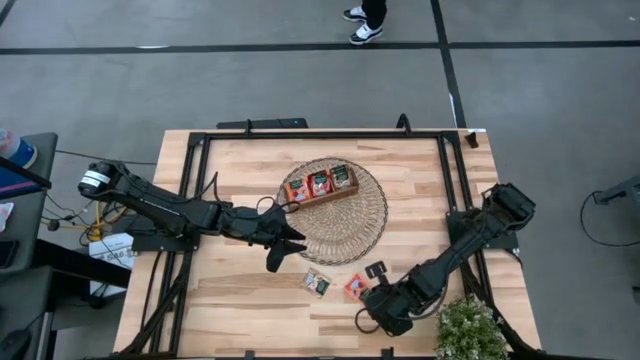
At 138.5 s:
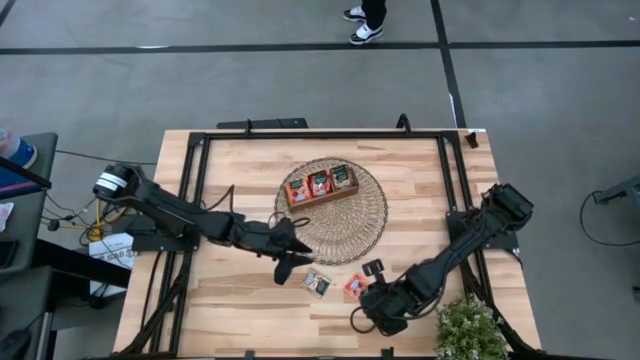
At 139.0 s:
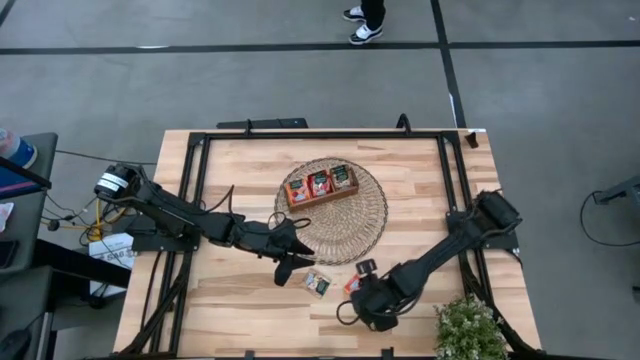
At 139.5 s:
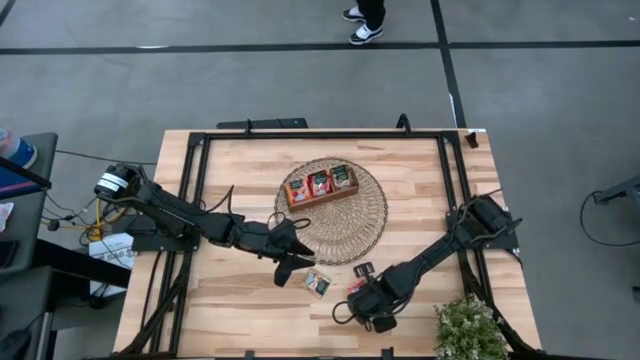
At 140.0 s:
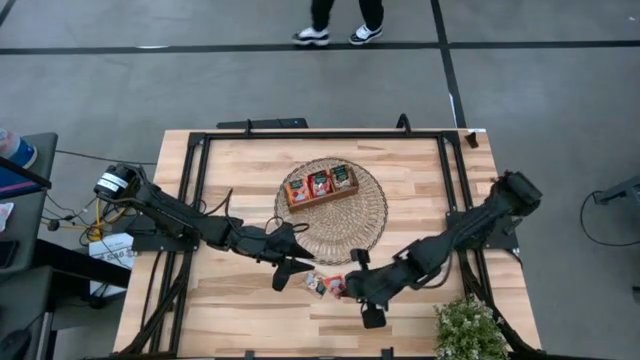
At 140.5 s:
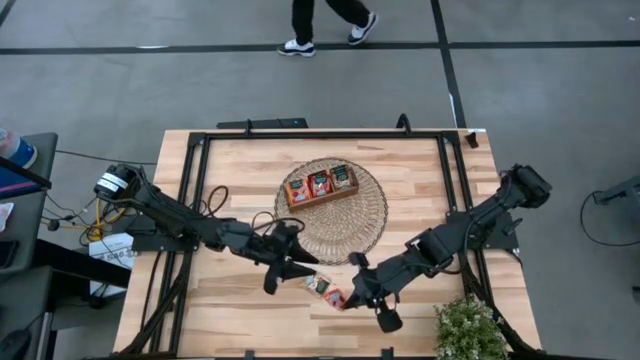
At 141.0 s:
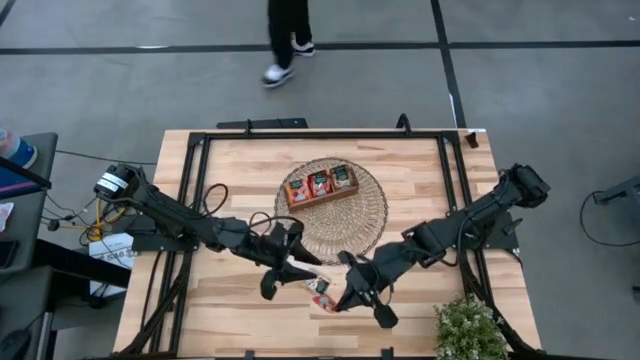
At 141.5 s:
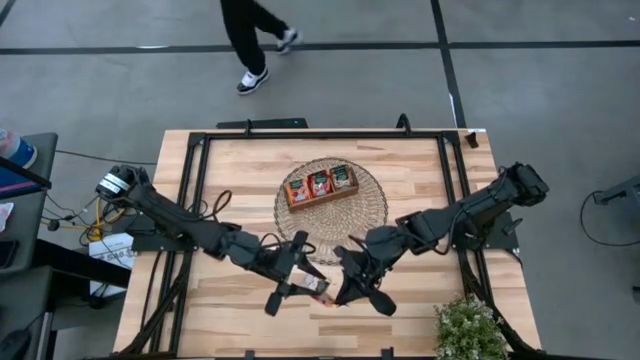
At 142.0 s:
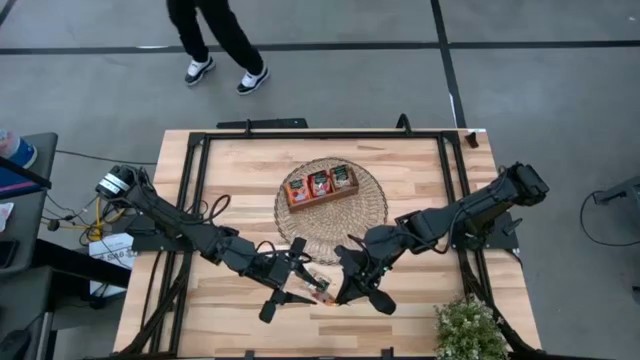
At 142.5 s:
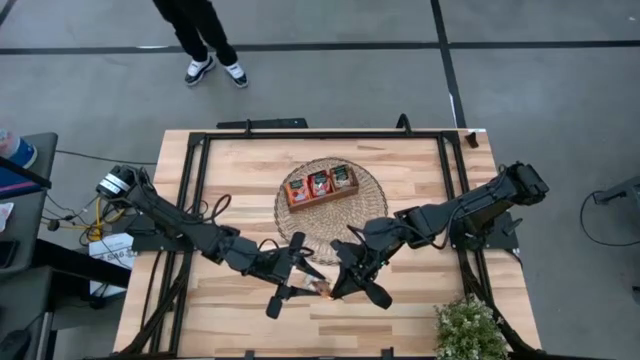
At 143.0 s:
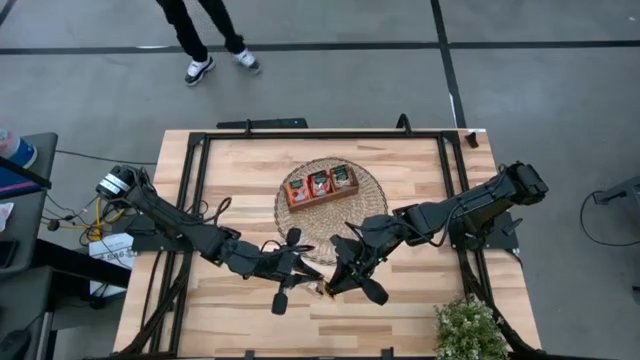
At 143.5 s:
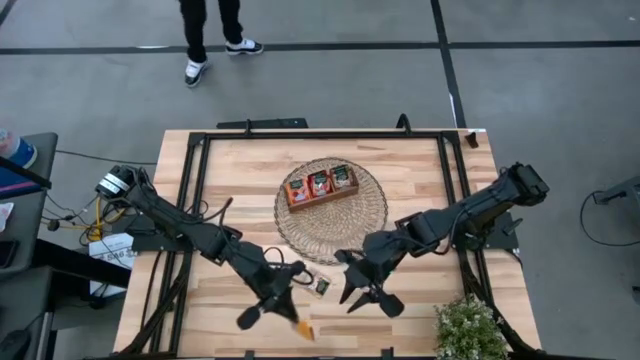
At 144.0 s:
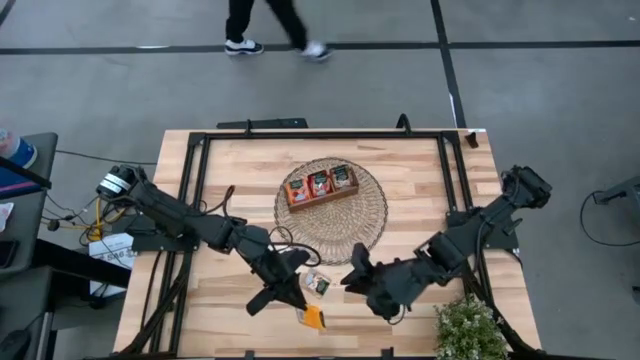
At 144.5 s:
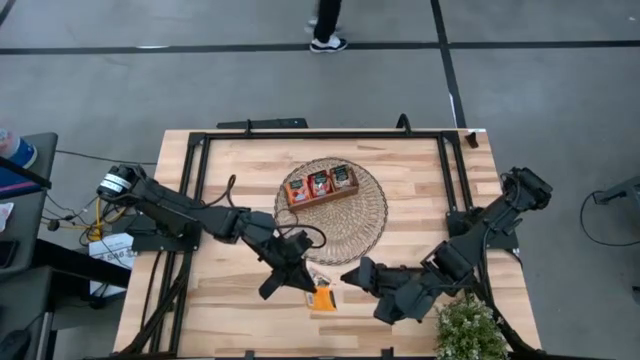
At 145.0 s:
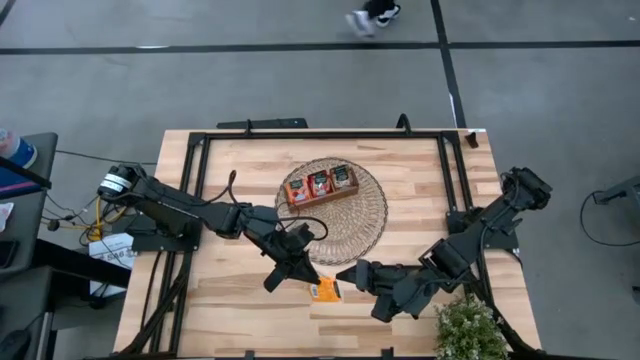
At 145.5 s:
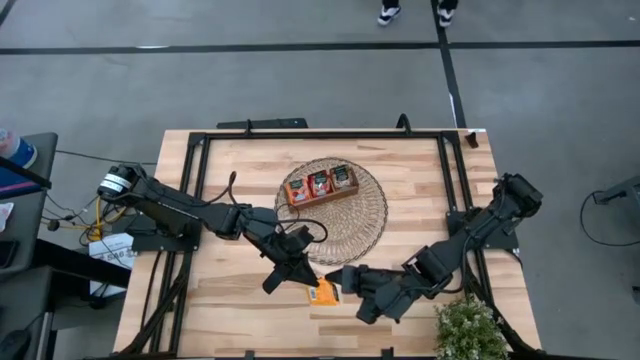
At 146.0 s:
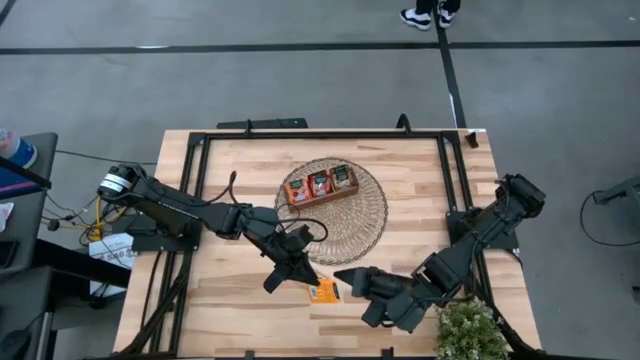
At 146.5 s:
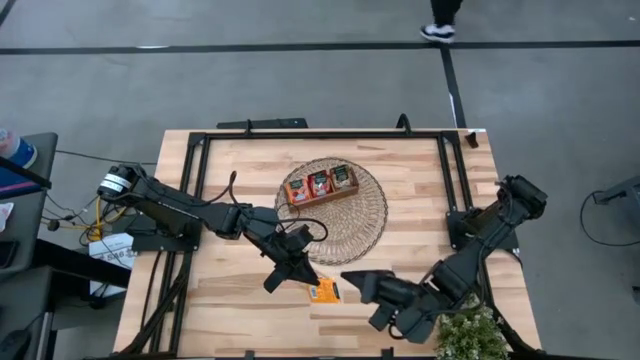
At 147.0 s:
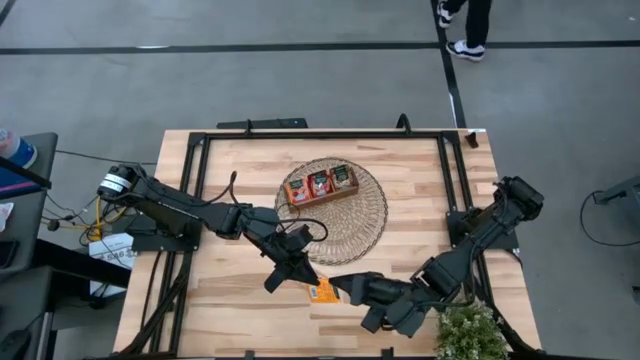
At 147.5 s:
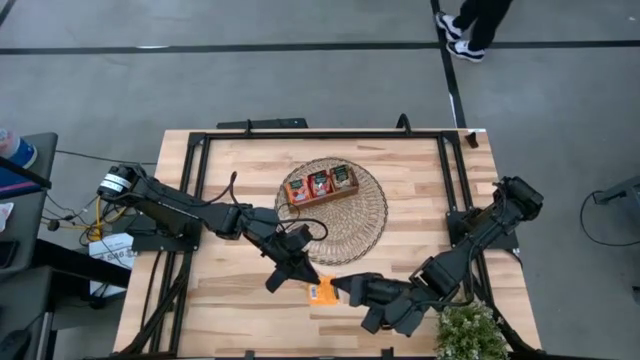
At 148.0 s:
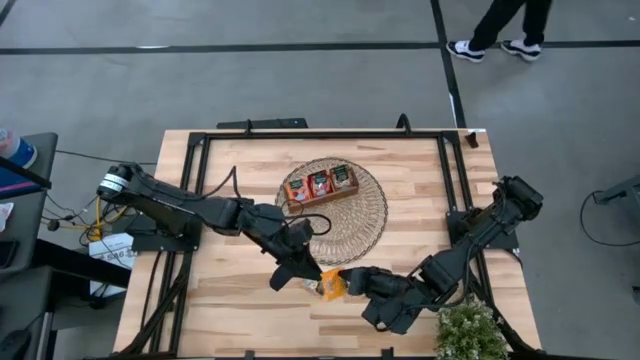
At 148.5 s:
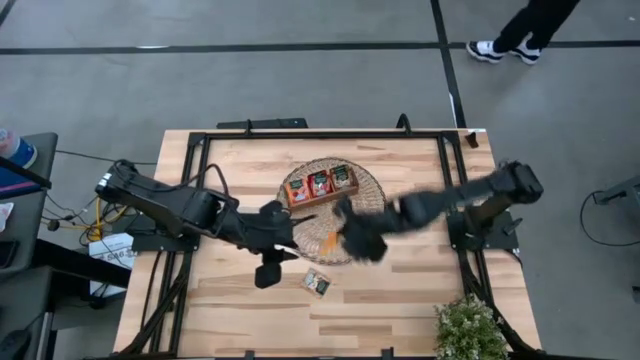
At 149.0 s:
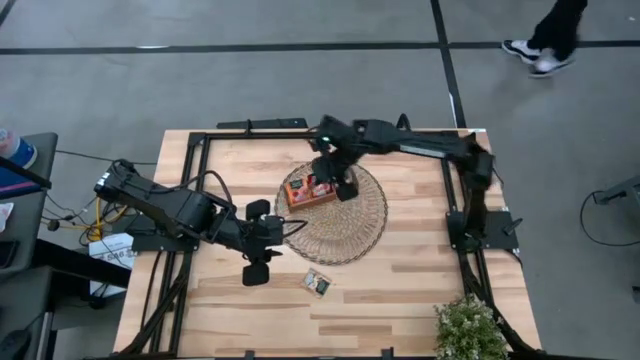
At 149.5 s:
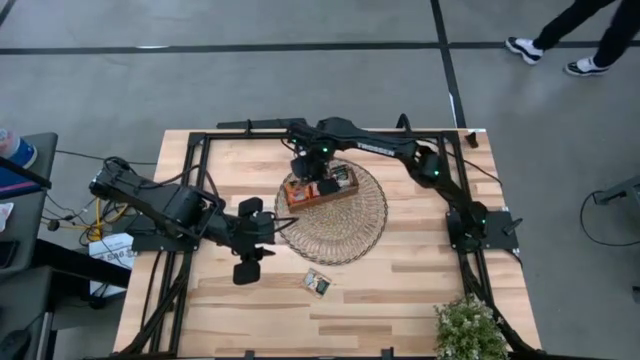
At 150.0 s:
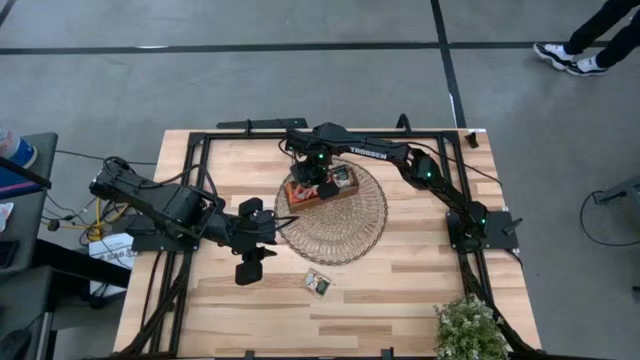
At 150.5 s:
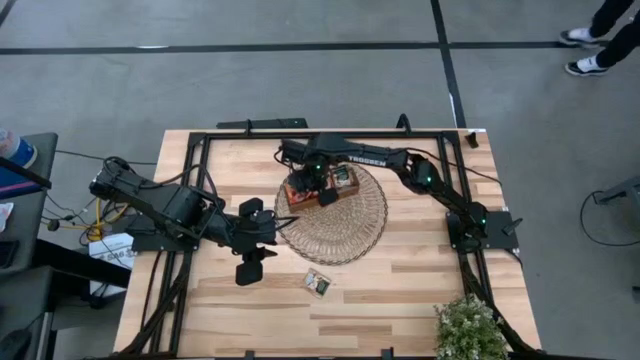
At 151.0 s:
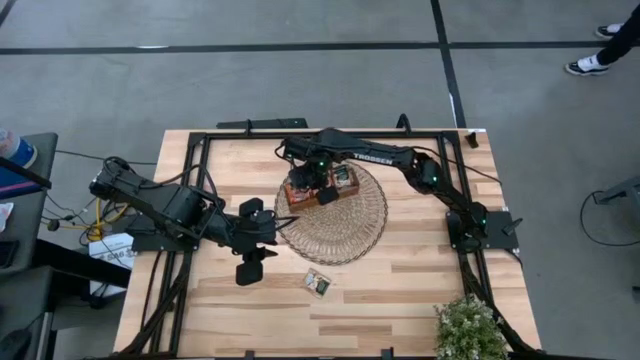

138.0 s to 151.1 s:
Task: Pick & Place Tea
Put the orange tea bag into the left side of the wooden organizer

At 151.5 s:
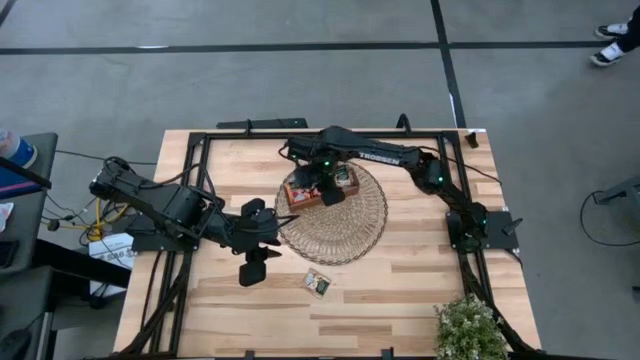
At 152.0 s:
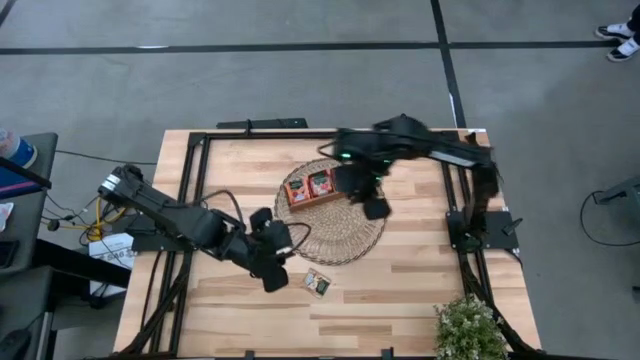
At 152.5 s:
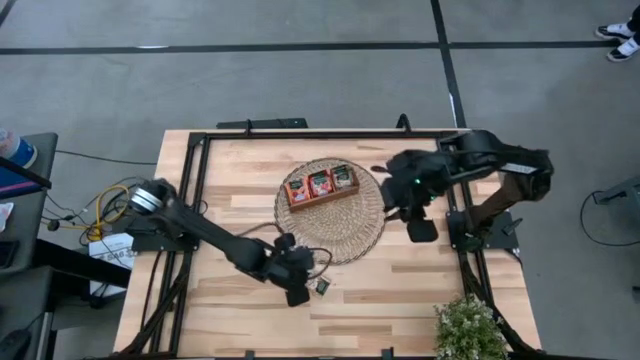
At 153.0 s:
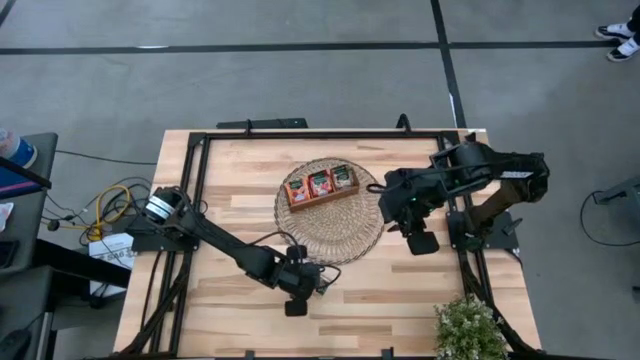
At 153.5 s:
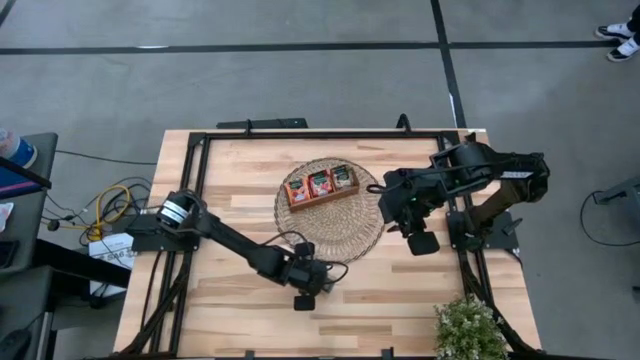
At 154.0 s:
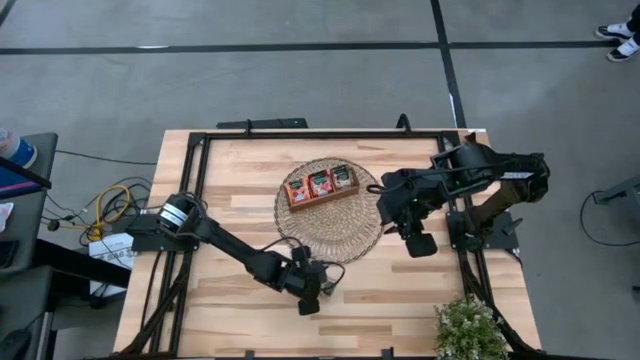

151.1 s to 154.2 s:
Put the brown tea bag into the right section of the wooden organizer
